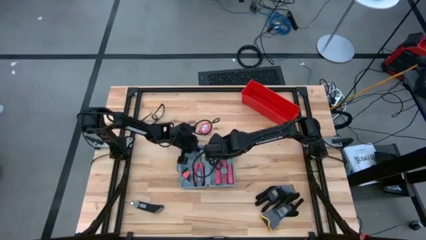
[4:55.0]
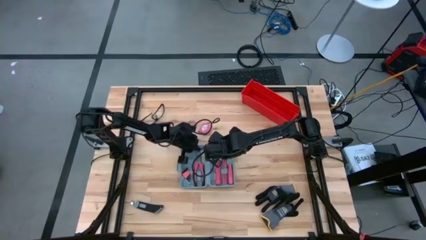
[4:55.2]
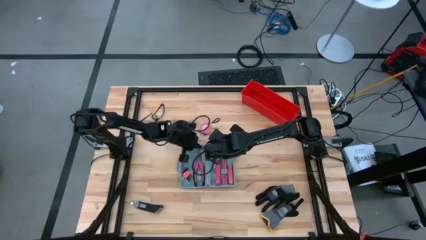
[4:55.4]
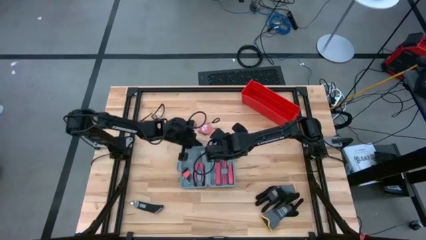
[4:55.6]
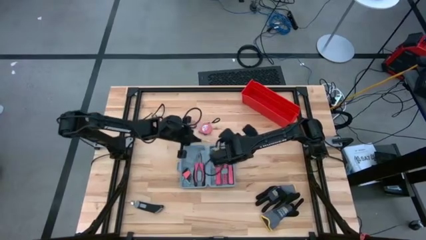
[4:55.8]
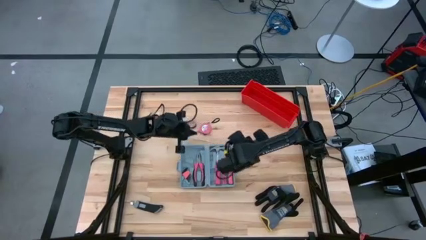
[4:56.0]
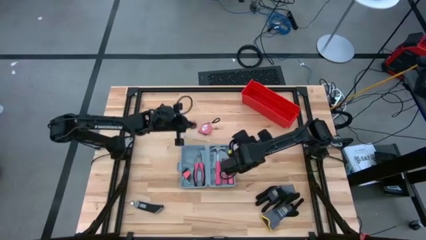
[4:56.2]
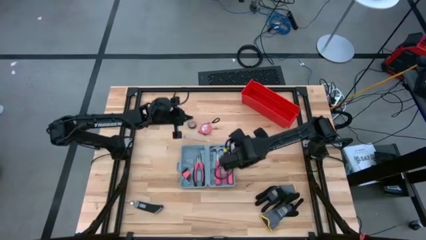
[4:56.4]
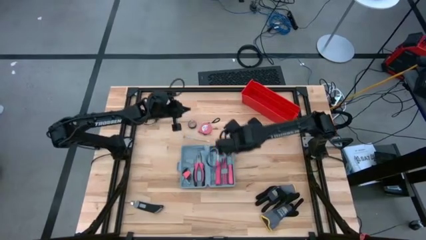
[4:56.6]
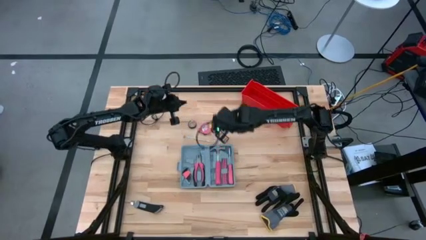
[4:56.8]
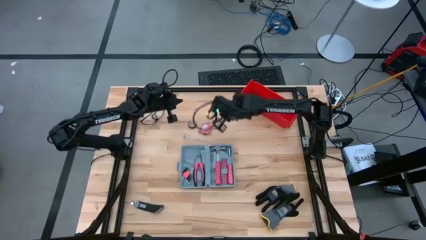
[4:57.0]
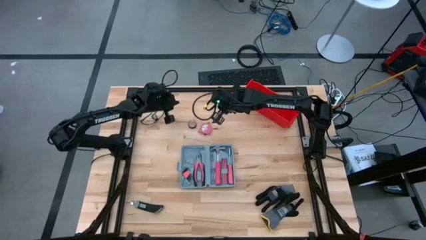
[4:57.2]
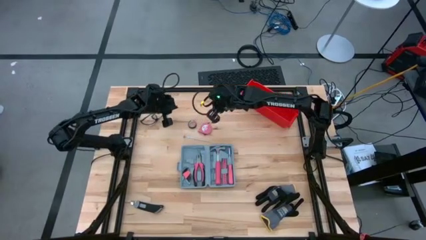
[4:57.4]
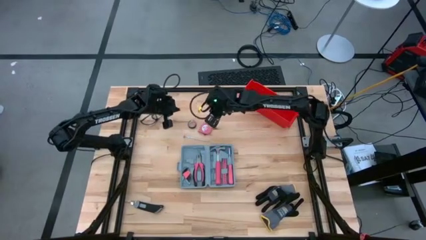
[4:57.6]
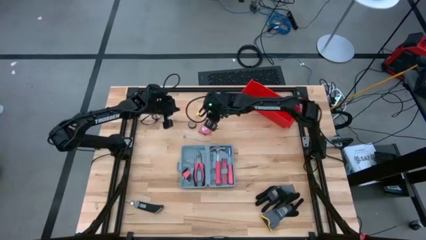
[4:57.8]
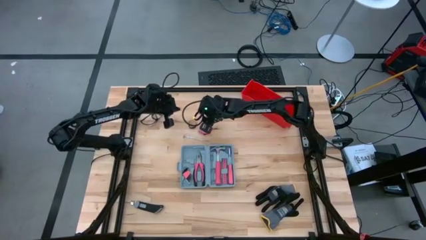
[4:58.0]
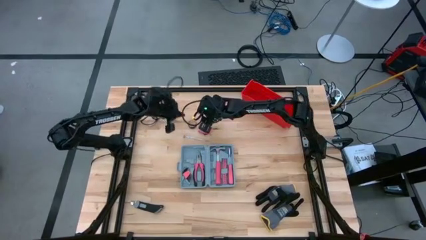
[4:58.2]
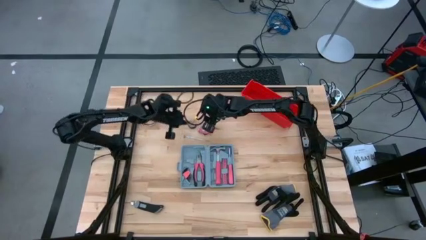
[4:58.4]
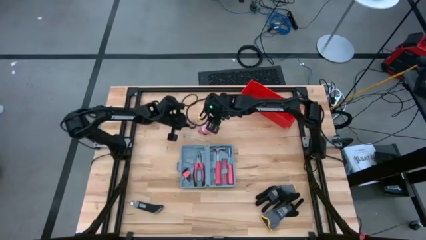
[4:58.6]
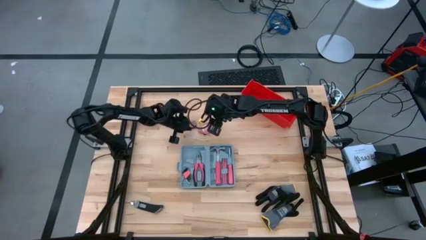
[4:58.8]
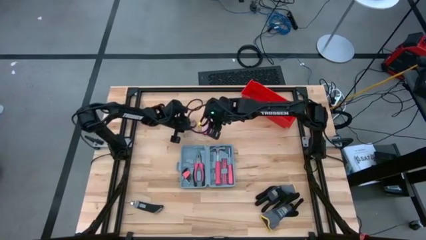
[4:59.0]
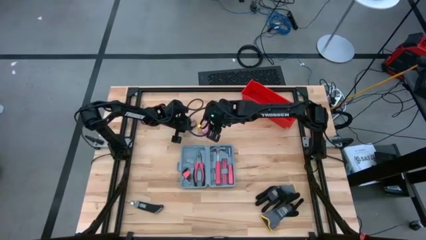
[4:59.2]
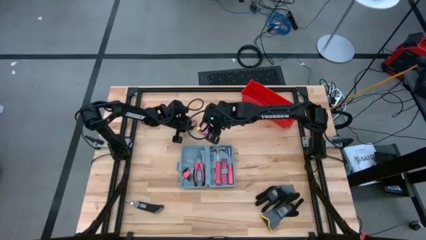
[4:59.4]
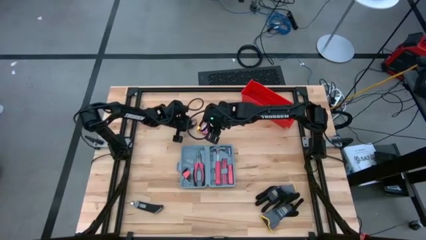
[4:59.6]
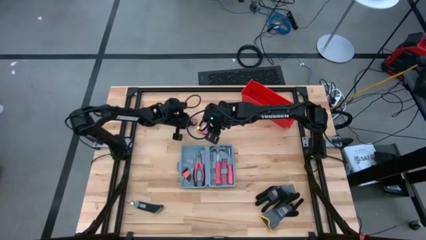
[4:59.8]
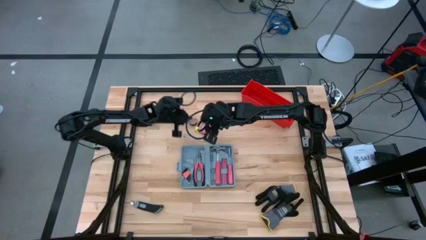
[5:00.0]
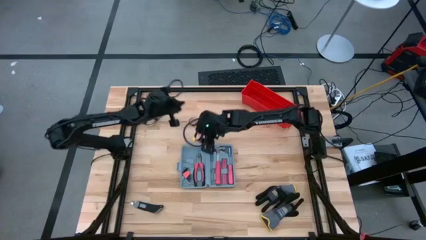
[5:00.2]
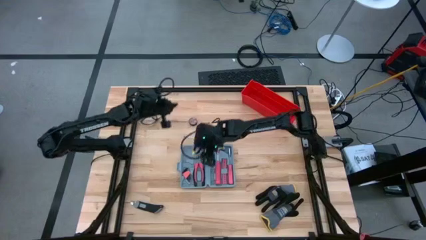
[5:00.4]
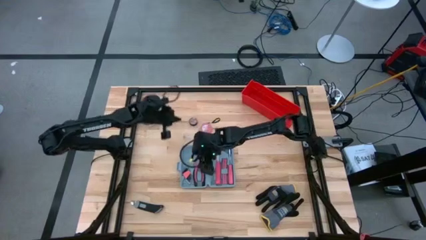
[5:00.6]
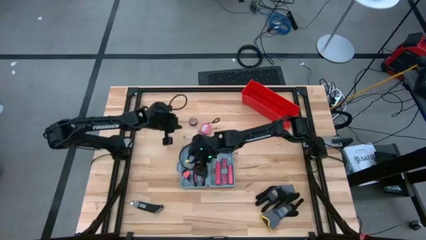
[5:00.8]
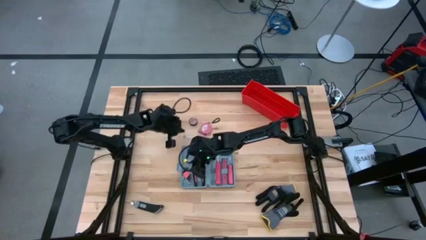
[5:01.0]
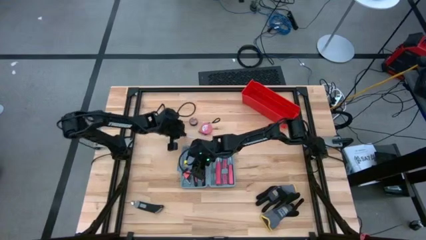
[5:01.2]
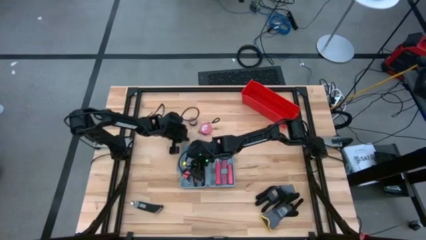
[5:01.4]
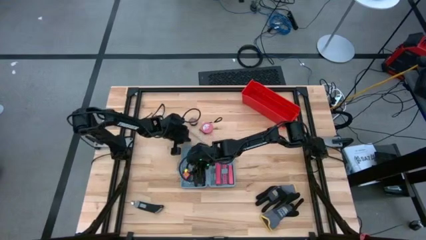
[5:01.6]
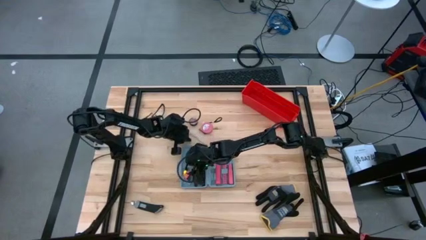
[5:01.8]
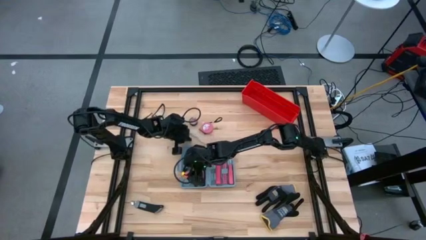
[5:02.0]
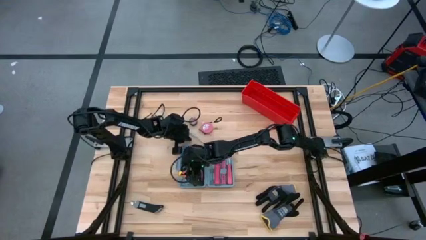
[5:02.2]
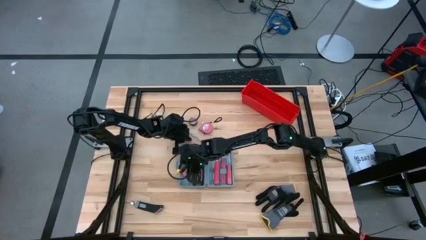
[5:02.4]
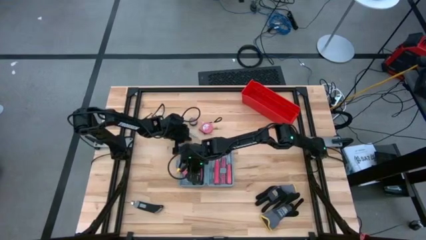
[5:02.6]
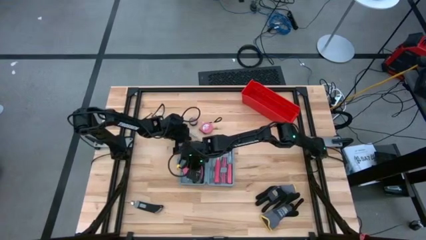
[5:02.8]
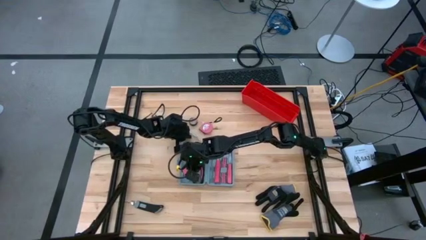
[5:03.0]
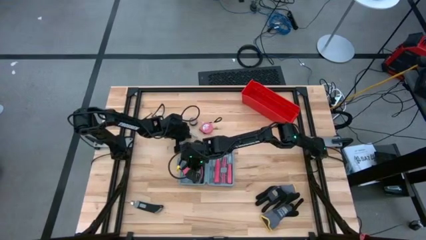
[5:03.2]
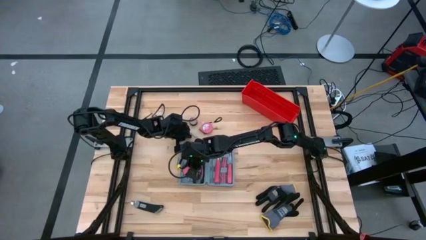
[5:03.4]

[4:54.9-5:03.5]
Task: prefit tool cases
Adjust the hex key on the toolbox

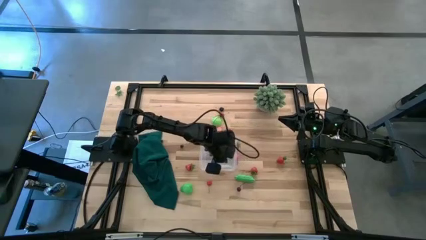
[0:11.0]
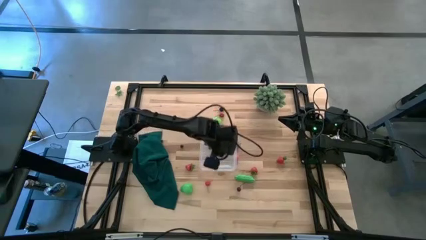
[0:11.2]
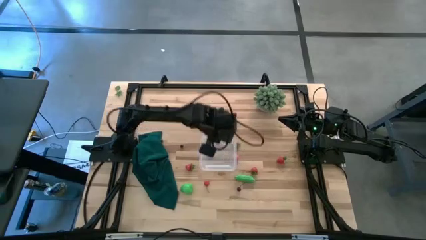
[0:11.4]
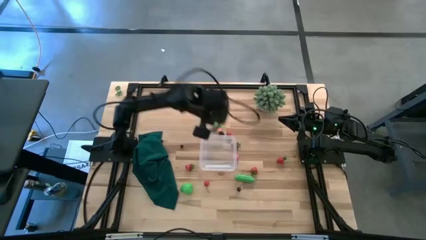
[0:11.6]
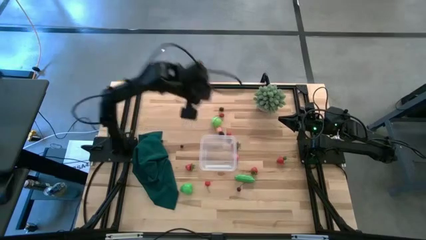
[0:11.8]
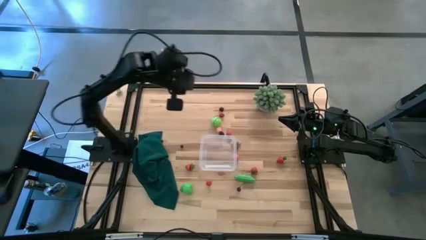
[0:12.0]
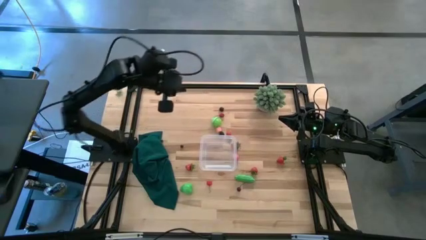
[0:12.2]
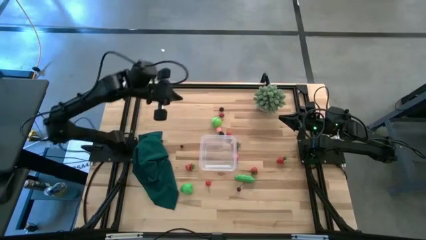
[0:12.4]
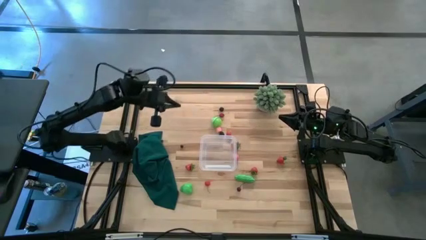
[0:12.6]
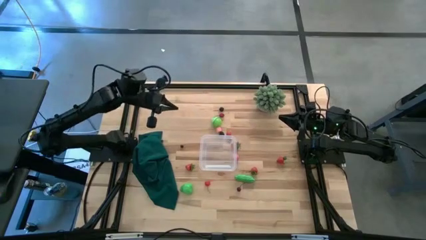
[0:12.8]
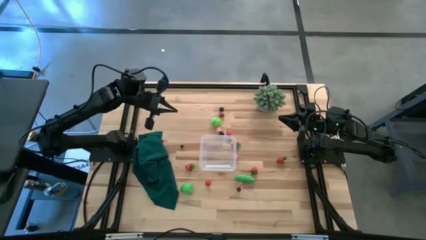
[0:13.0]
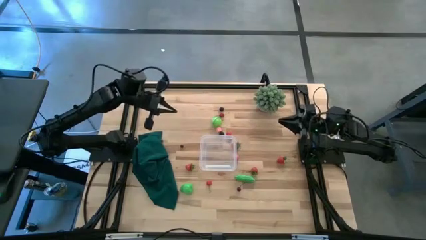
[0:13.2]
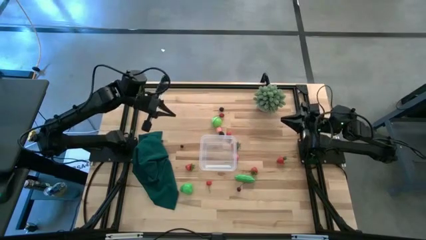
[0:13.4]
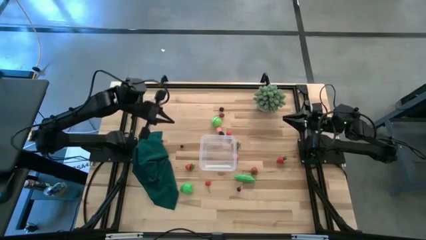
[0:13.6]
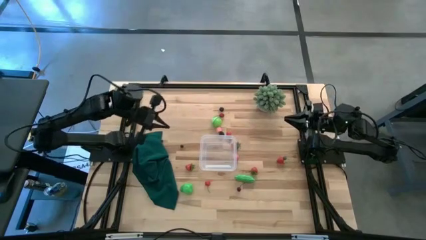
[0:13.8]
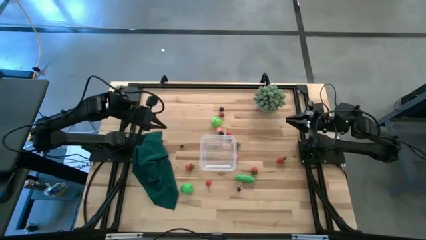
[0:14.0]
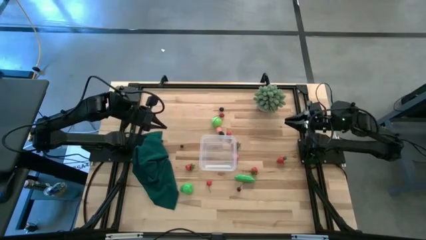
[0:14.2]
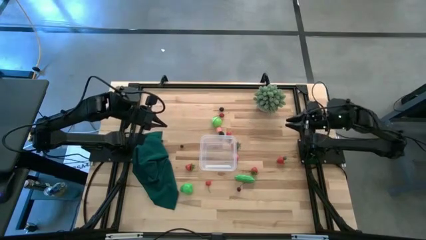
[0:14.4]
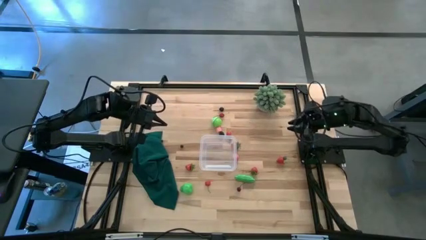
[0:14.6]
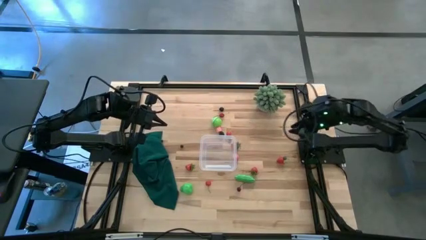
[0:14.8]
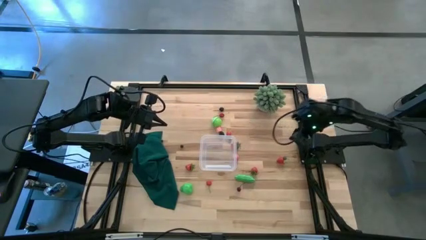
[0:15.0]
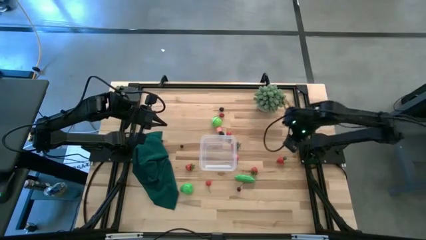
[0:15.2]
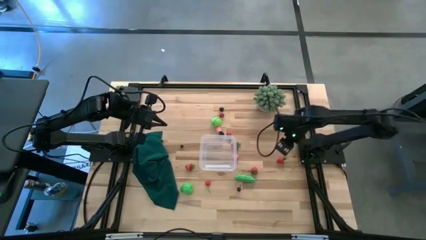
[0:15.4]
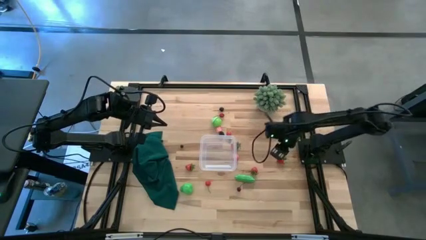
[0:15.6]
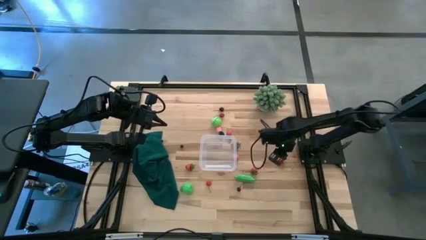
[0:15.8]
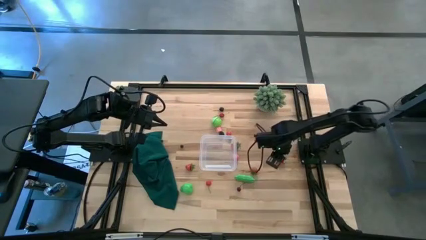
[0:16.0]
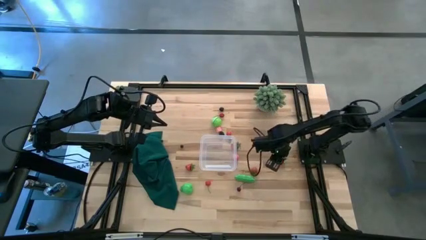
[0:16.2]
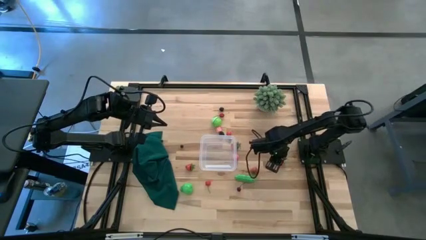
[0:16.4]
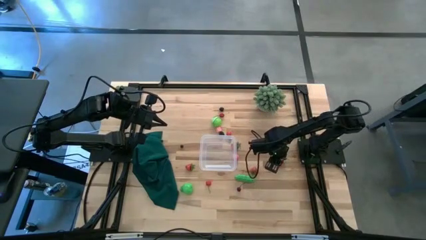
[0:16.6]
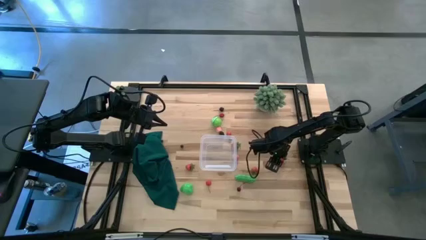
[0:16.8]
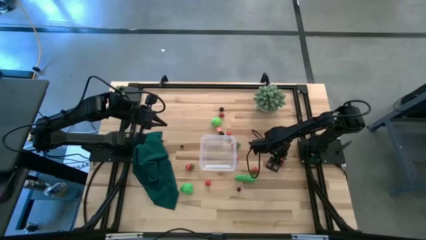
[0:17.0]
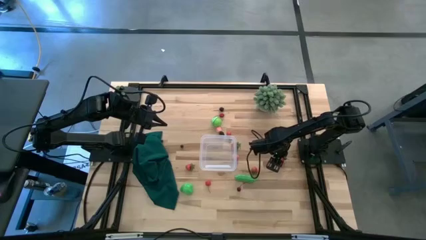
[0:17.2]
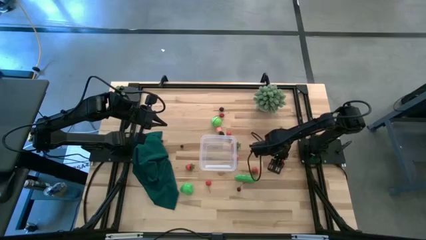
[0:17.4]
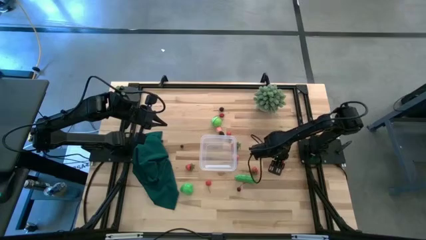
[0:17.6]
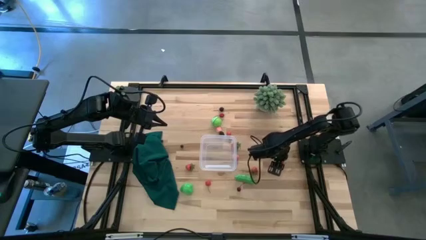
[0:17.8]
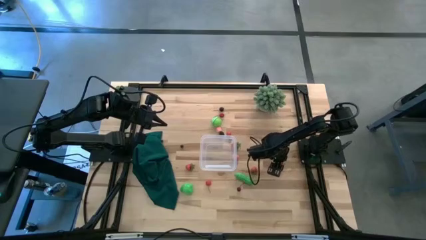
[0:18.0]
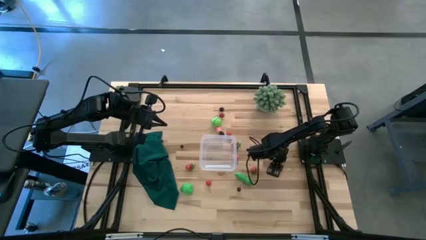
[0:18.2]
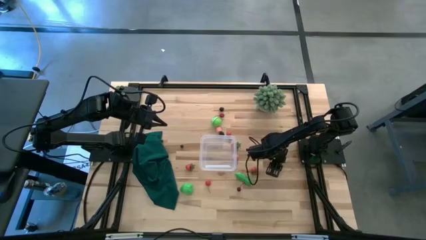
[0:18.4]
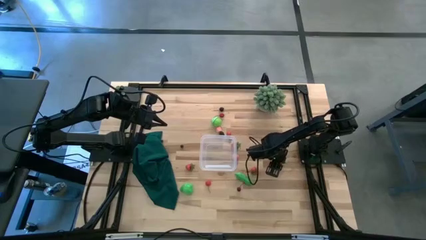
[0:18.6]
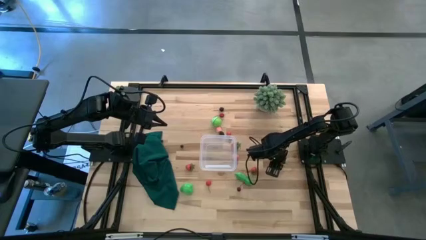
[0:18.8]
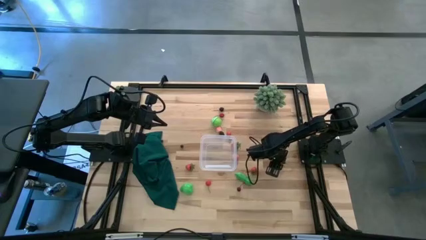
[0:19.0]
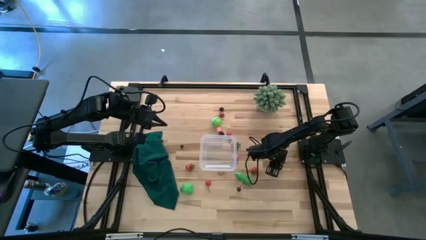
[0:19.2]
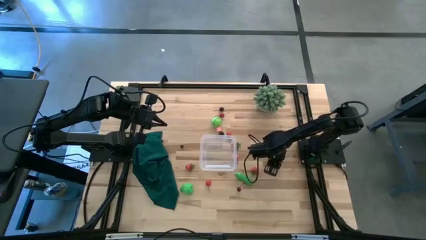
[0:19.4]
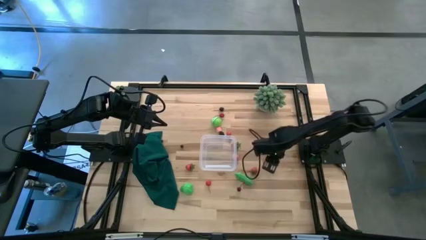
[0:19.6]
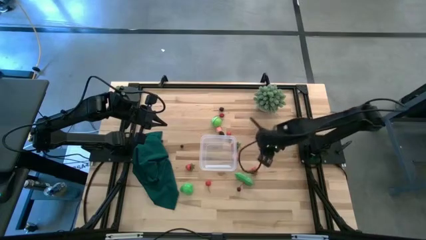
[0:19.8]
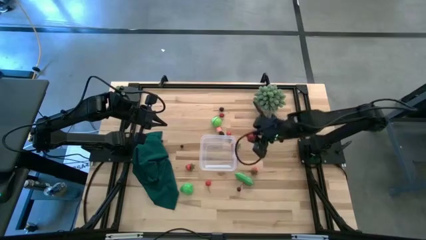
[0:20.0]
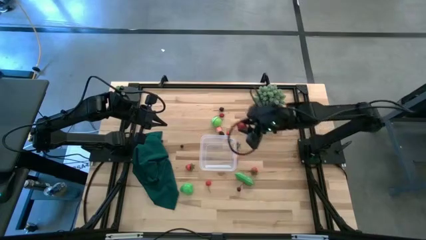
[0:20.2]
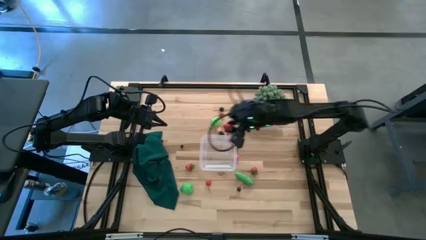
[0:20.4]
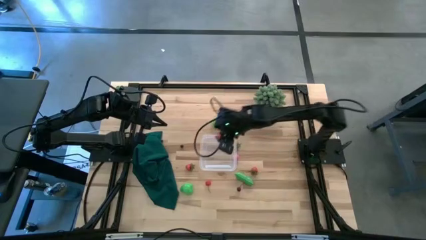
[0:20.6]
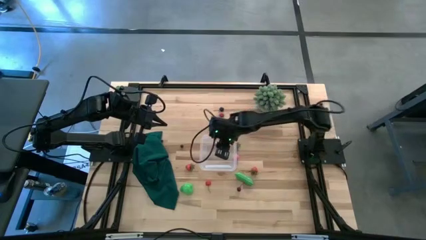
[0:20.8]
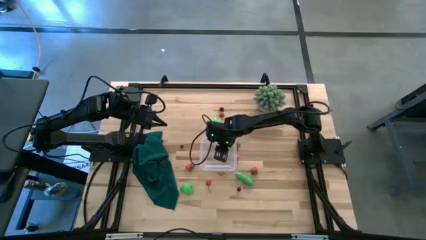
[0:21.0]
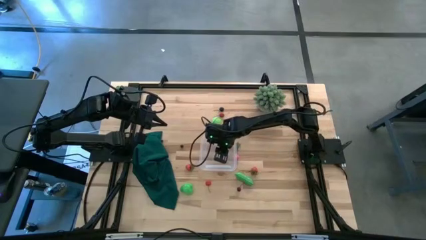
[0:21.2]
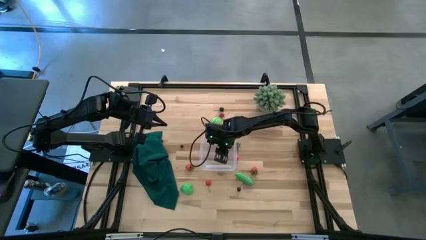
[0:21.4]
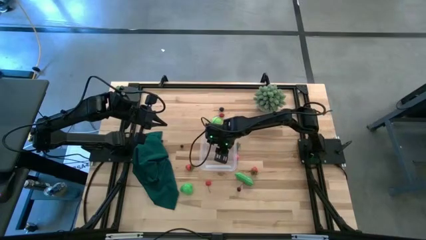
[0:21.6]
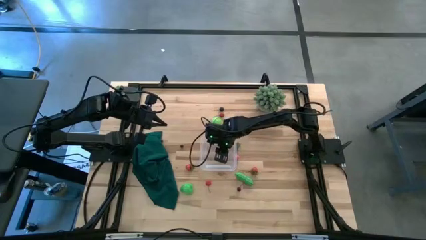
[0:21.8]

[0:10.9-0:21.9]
Task: Pick and placing Produce into tupperware
Put the red strawberry into the transparent bin
